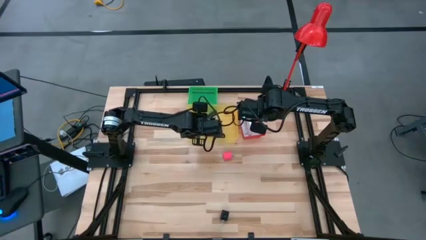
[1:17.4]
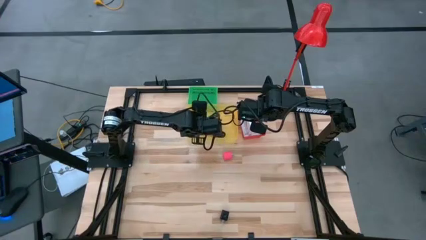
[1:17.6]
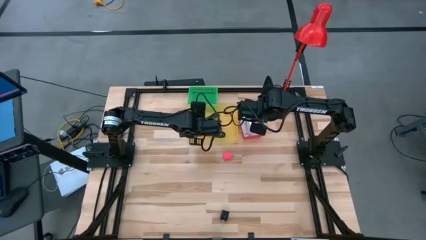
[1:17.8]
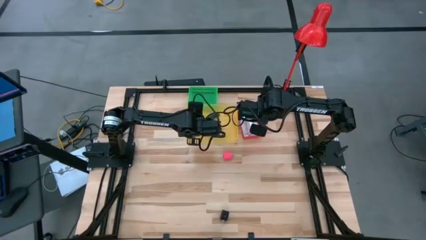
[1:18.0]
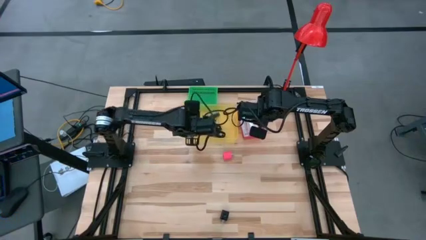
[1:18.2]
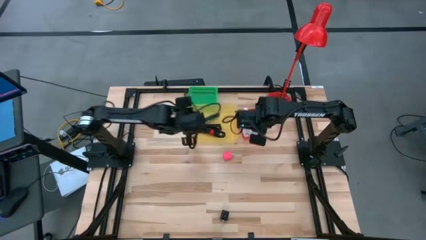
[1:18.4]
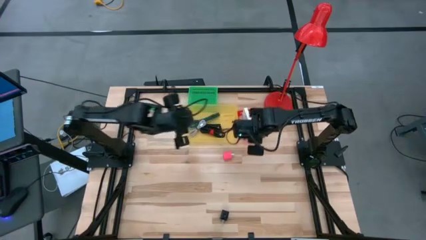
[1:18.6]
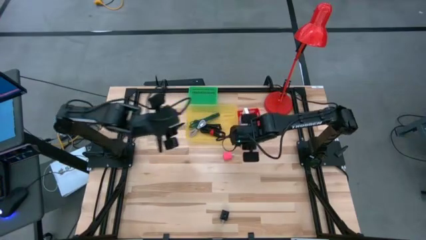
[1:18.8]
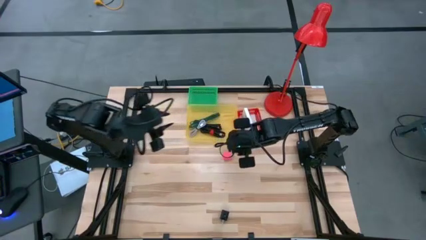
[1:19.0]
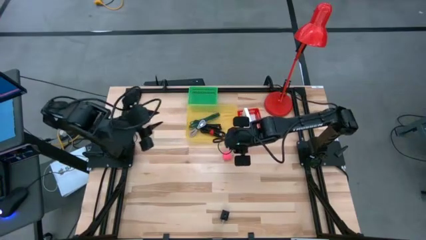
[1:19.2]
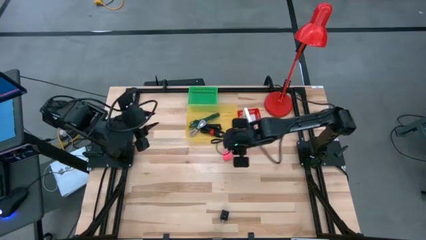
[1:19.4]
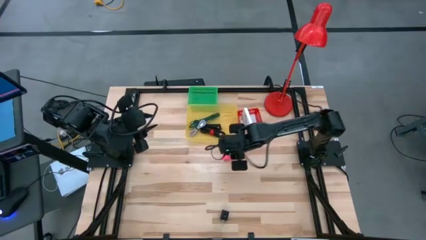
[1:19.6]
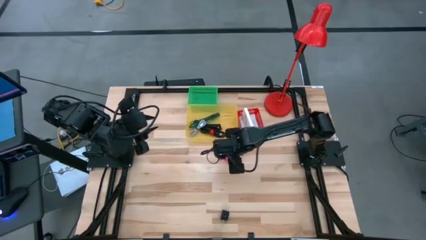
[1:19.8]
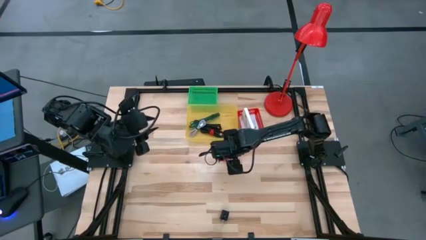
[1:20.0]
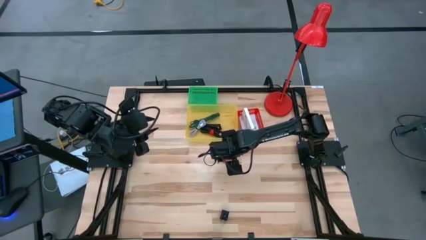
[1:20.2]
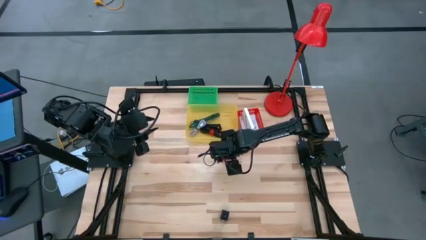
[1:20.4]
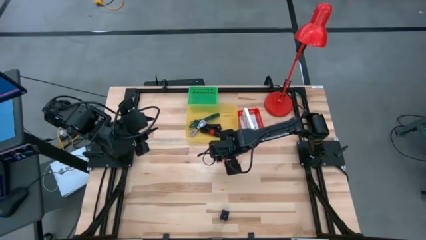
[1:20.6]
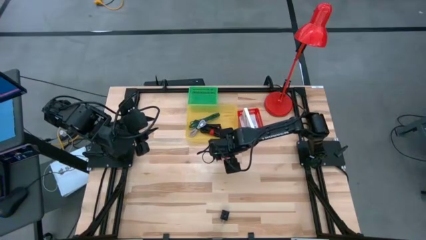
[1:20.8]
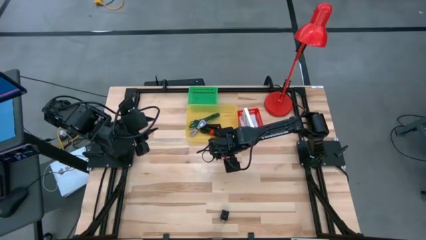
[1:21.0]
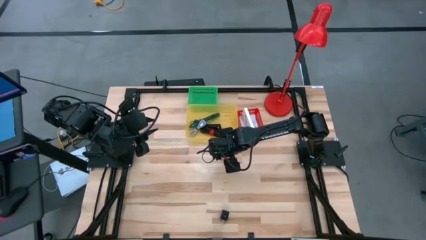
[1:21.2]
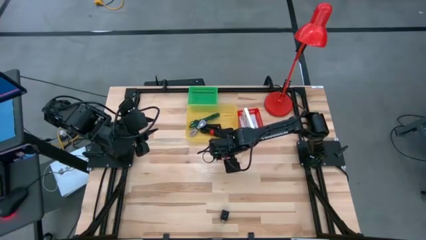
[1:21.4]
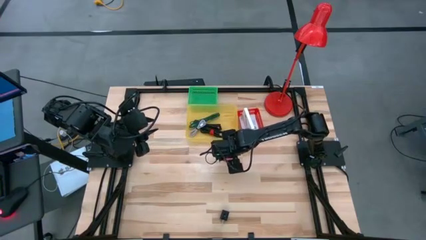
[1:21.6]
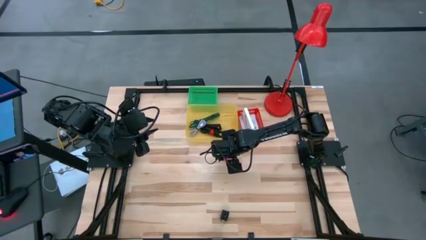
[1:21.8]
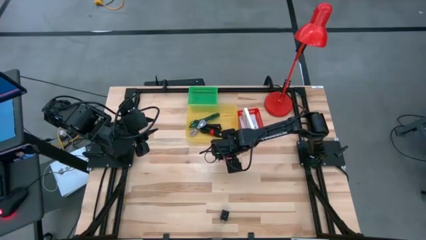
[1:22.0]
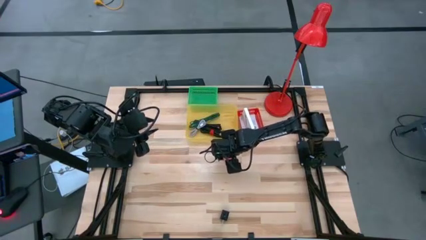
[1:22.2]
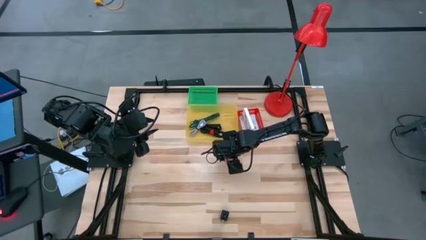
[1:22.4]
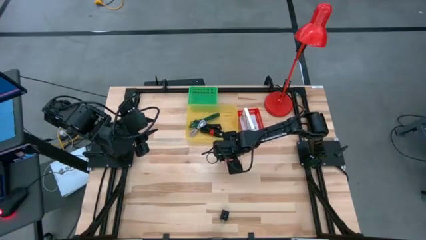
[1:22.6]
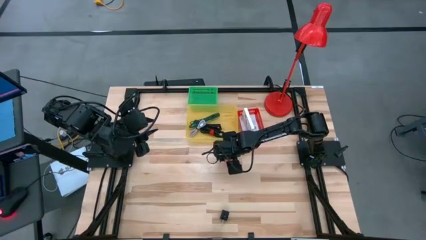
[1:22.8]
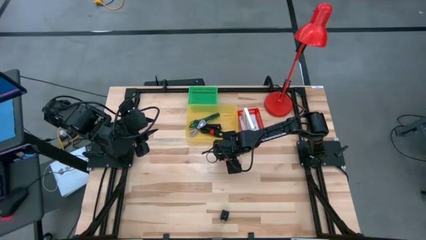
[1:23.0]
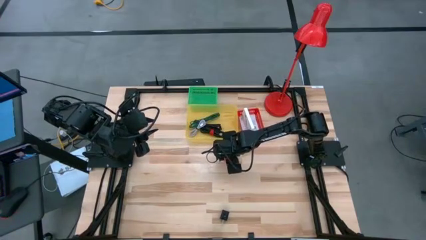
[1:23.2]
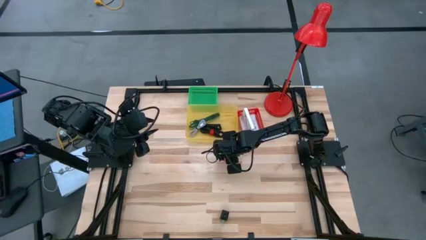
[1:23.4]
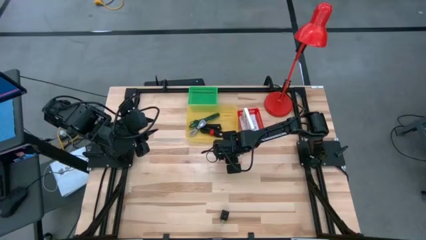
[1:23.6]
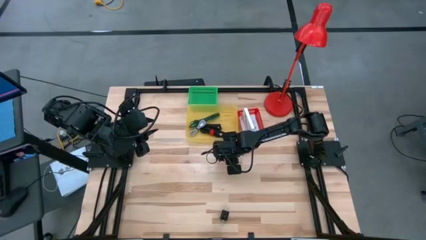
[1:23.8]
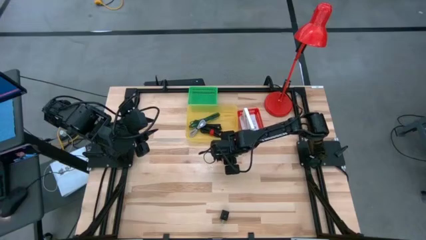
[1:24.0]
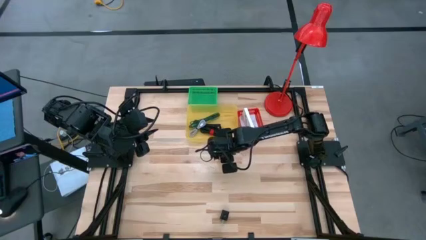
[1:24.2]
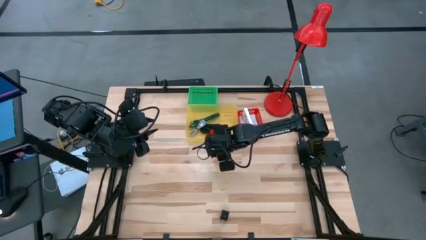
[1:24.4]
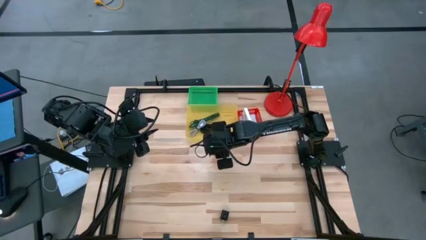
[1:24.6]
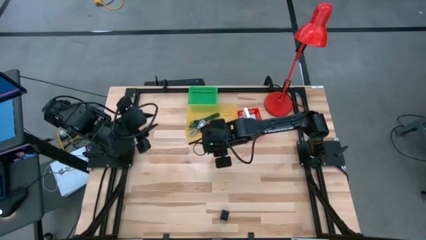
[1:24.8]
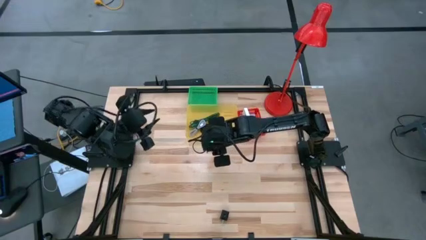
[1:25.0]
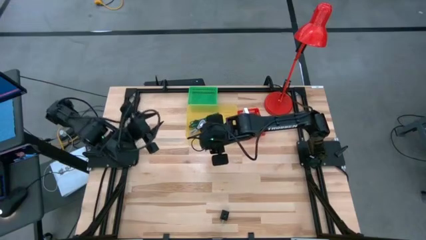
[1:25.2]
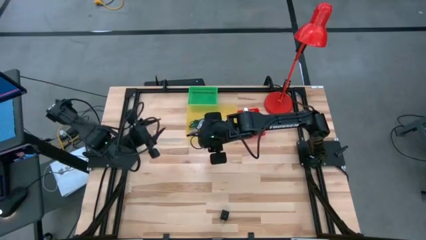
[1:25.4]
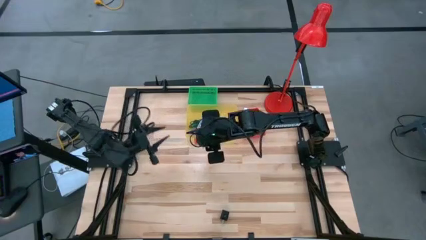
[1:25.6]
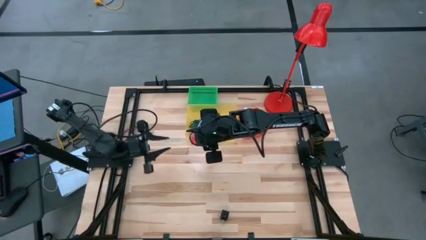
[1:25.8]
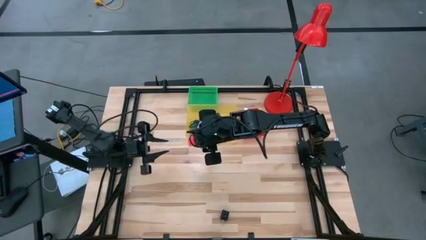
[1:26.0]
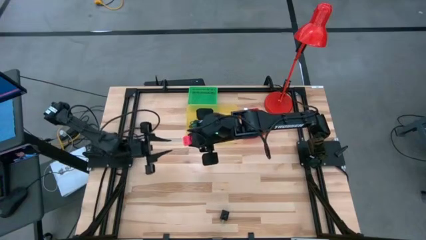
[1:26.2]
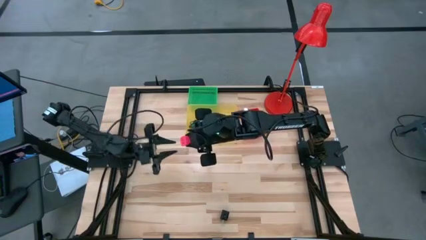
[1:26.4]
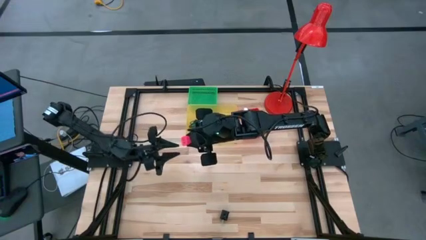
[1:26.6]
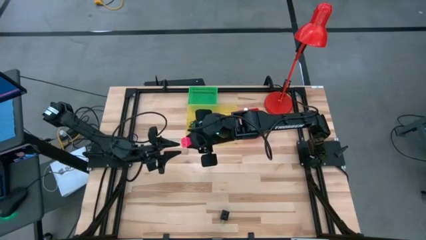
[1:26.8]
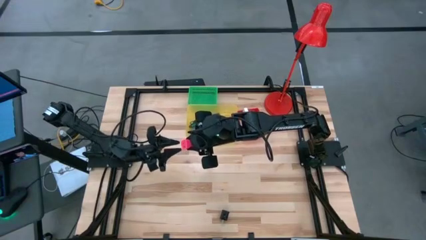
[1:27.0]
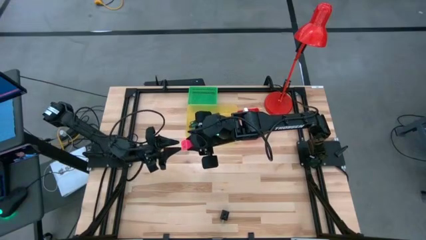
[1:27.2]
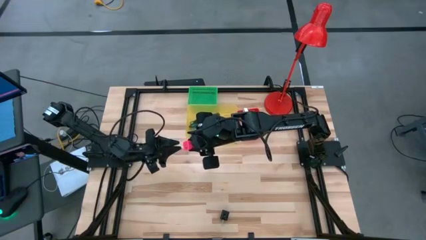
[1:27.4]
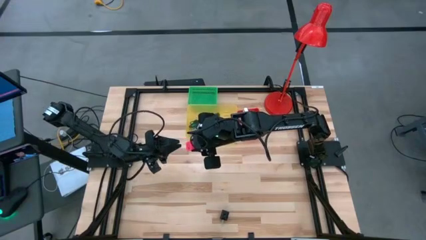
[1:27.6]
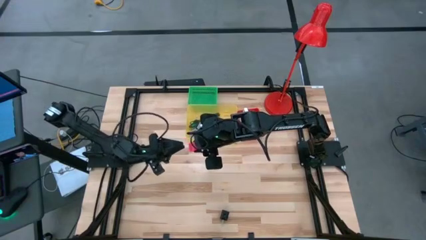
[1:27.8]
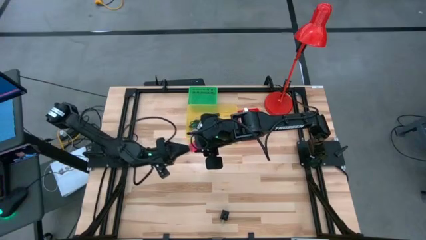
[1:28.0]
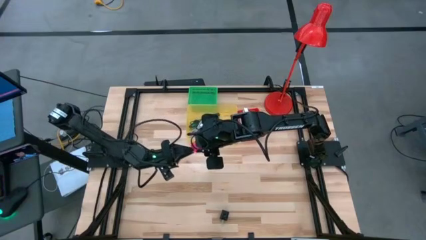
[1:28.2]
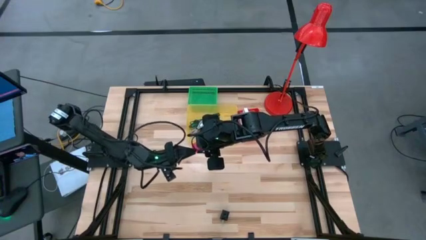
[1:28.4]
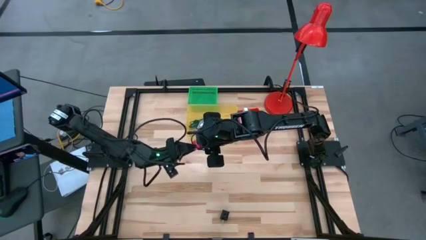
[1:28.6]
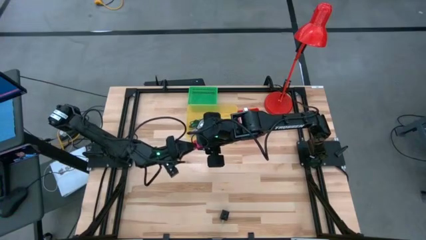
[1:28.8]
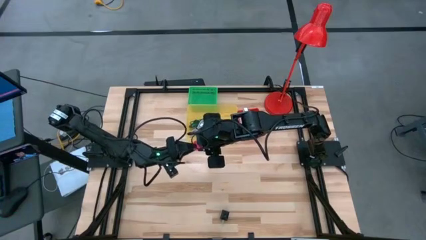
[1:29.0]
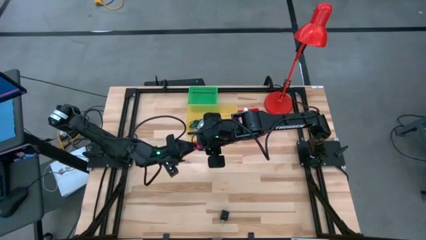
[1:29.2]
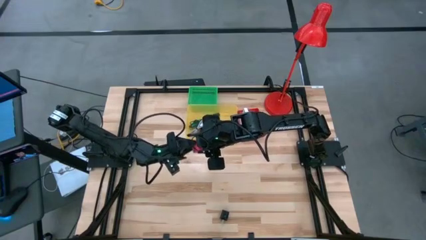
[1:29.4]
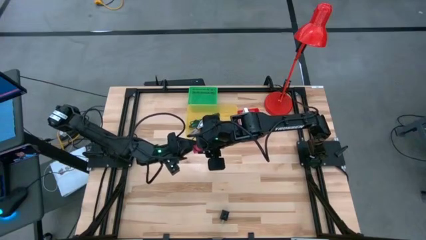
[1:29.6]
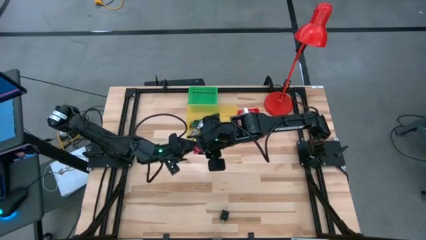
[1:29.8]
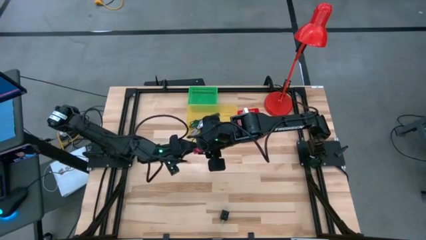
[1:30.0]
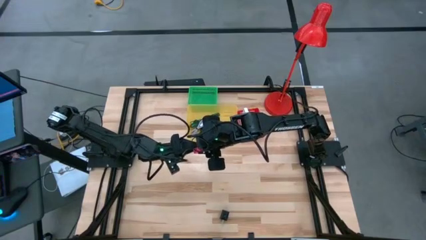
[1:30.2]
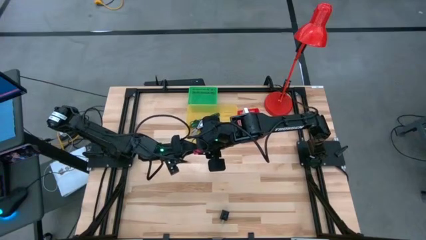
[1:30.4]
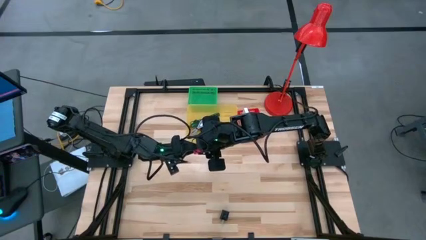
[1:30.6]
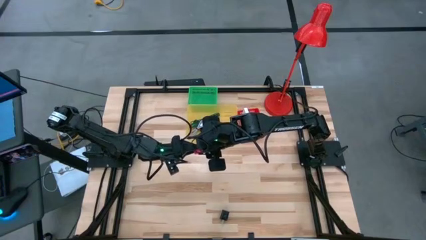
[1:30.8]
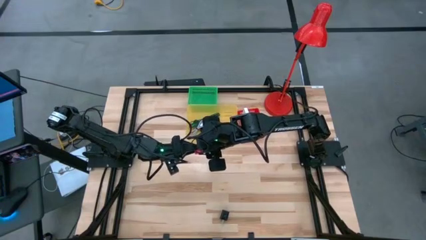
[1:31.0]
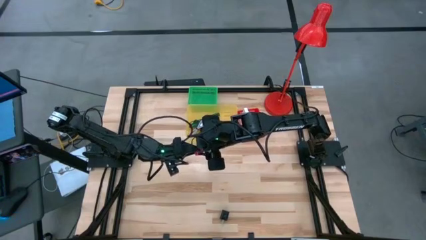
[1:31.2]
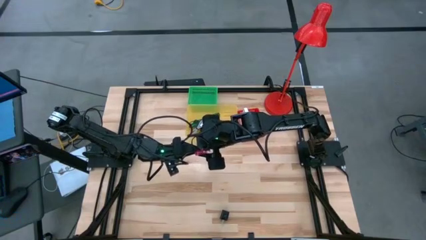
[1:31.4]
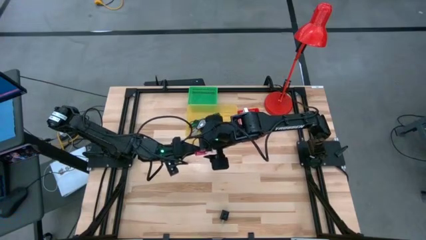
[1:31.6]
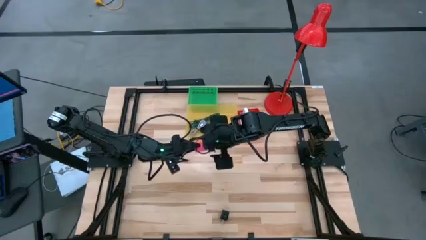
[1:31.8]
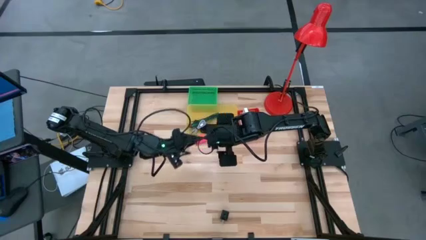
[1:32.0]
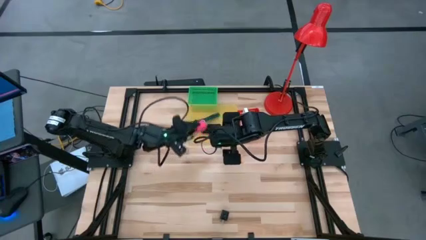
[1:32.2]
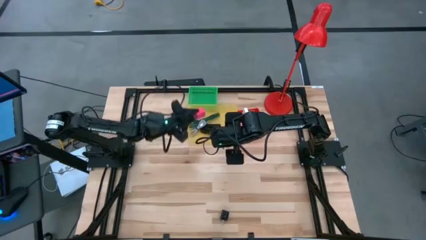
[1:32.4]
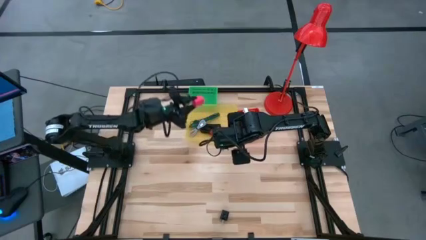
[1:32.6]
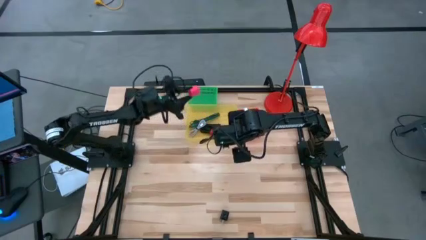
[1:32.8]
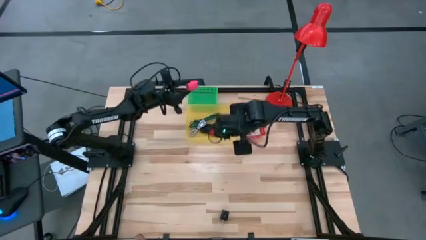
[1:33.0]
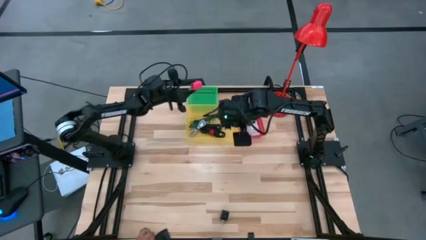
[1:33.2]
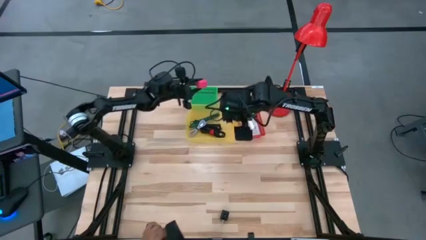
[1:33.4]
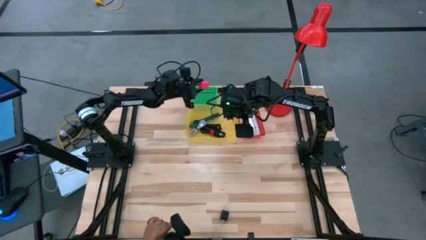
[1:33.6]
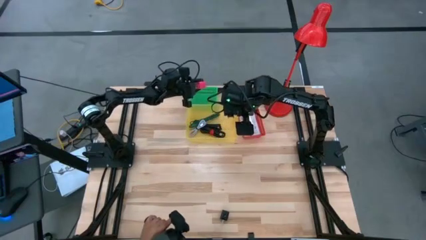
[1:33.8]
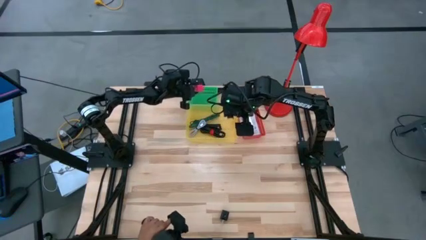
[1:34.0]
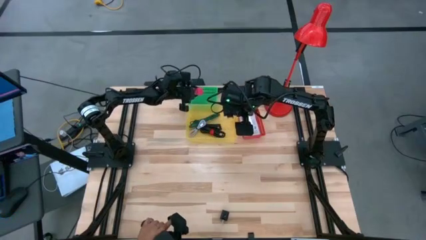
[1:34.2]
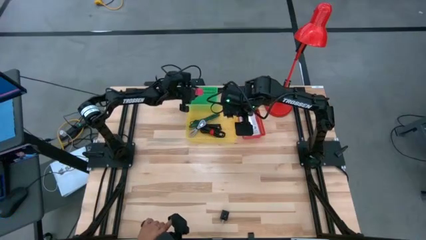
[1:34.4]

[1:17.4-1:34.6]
Task: Pick and place items into bin
Put the pink charger adapter into the green bin
